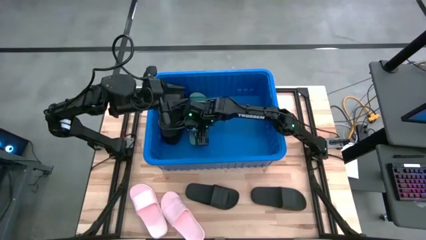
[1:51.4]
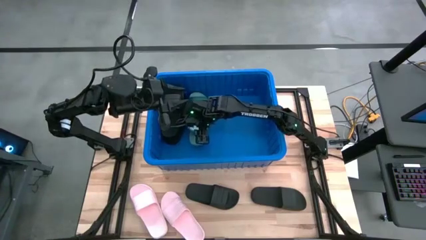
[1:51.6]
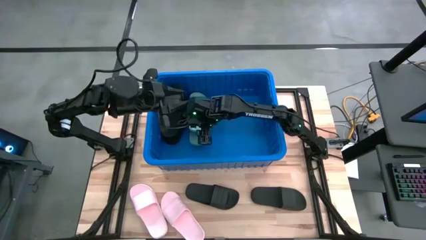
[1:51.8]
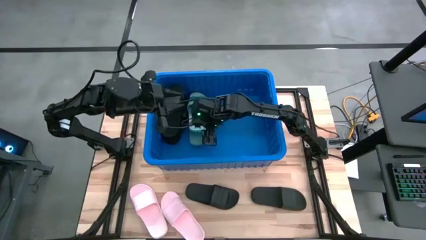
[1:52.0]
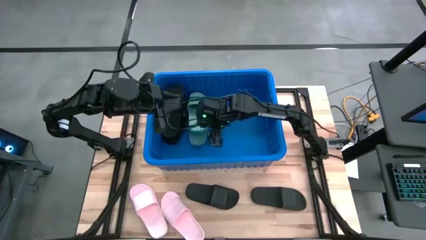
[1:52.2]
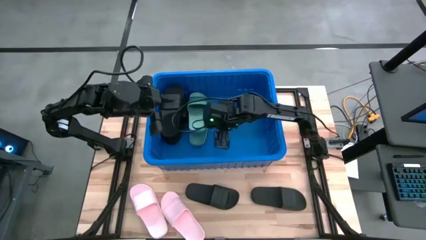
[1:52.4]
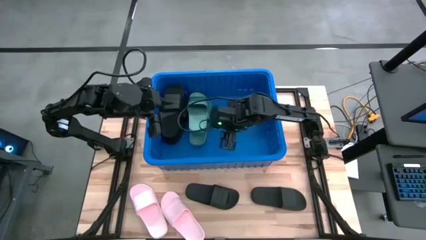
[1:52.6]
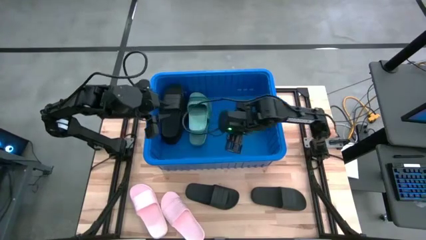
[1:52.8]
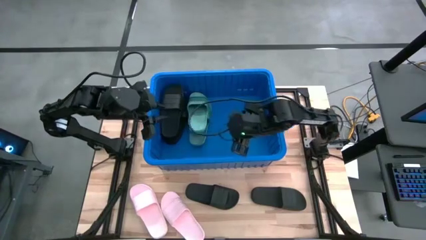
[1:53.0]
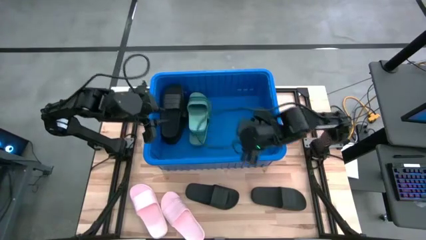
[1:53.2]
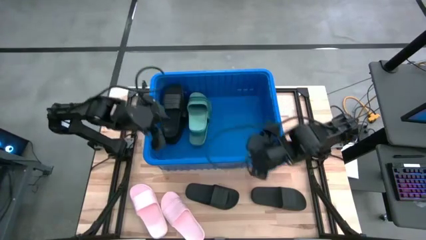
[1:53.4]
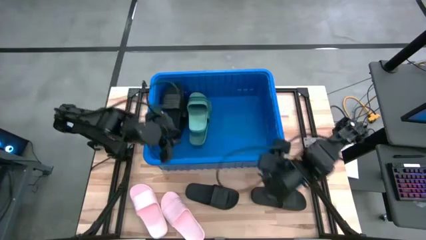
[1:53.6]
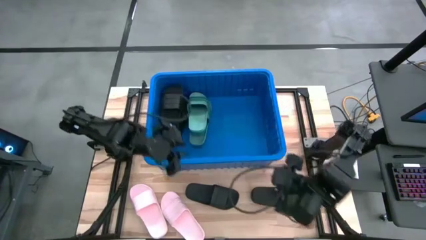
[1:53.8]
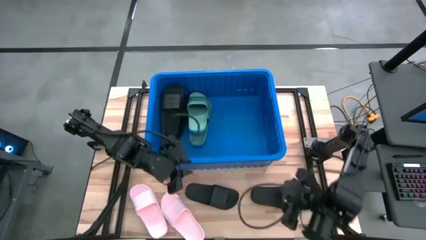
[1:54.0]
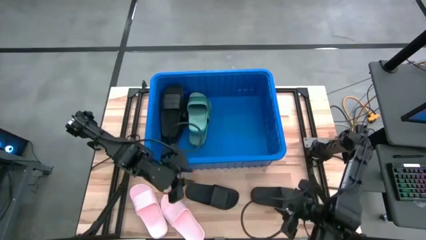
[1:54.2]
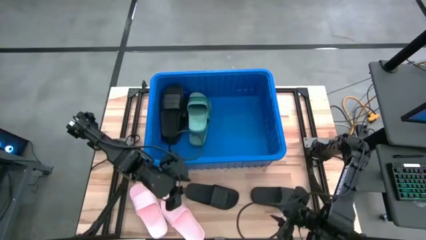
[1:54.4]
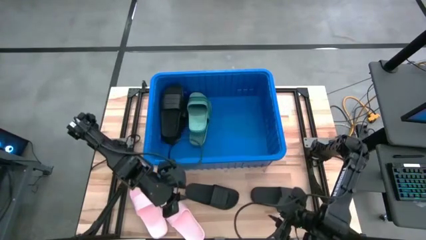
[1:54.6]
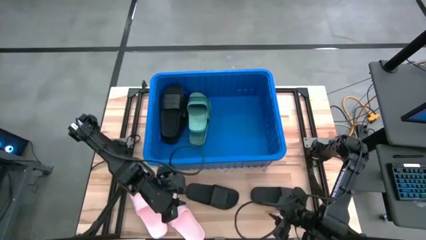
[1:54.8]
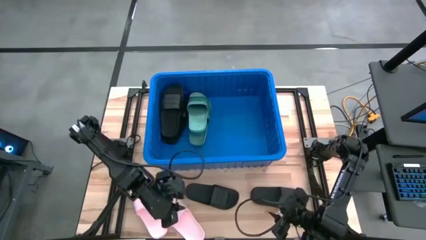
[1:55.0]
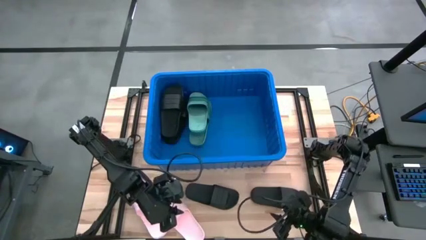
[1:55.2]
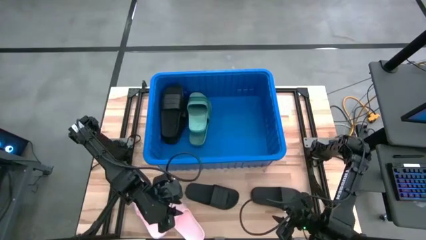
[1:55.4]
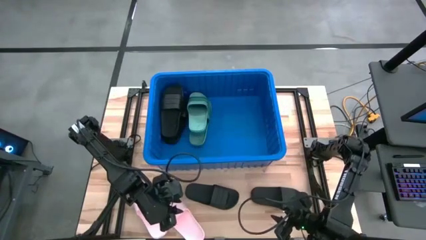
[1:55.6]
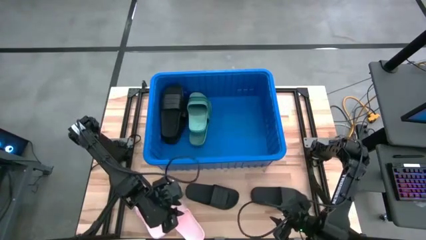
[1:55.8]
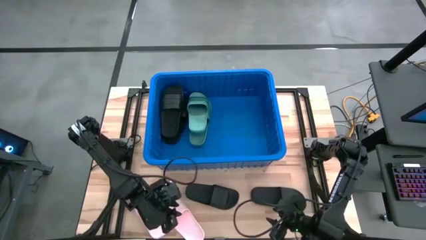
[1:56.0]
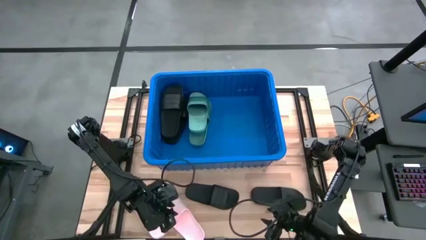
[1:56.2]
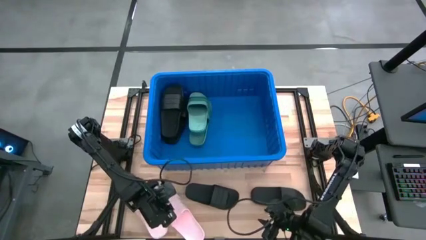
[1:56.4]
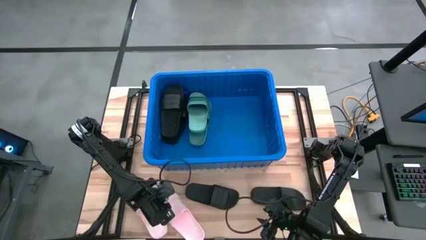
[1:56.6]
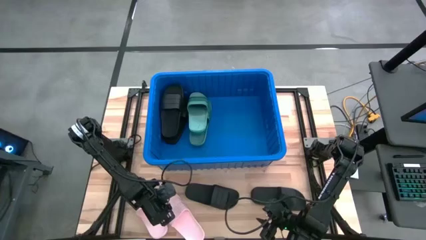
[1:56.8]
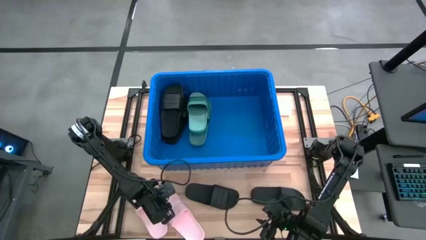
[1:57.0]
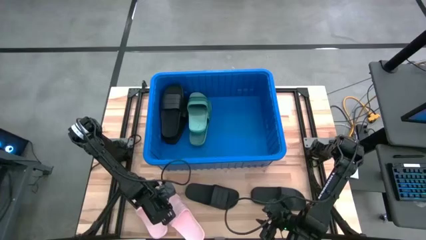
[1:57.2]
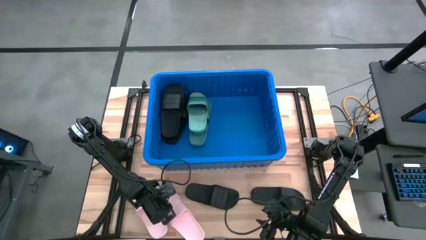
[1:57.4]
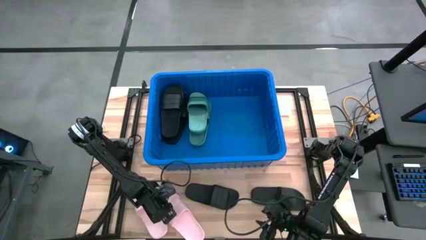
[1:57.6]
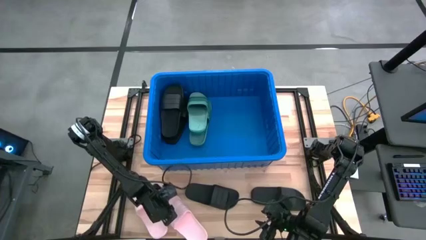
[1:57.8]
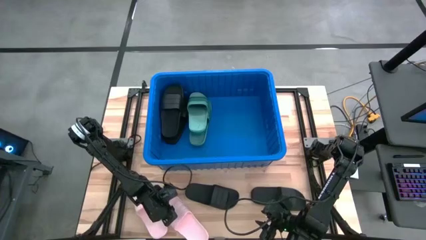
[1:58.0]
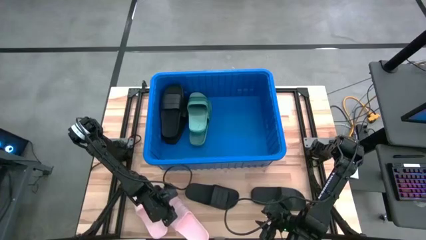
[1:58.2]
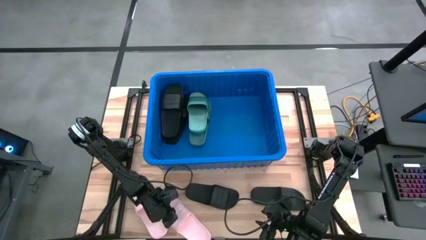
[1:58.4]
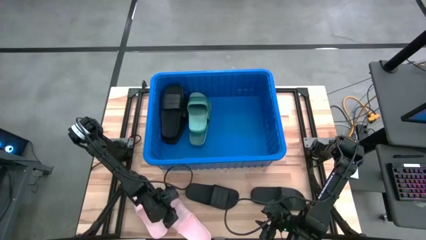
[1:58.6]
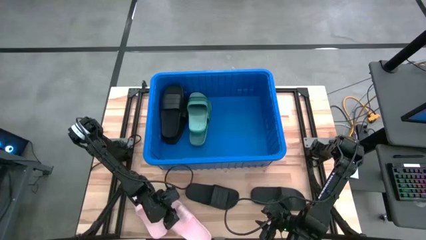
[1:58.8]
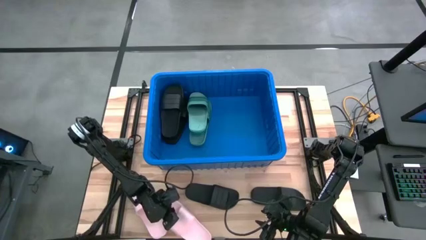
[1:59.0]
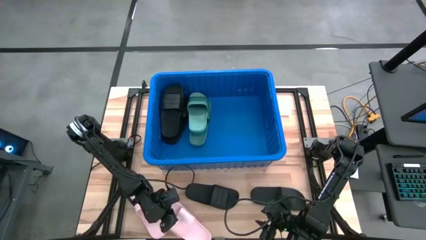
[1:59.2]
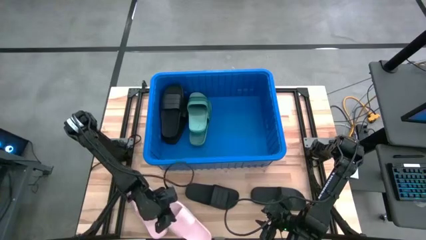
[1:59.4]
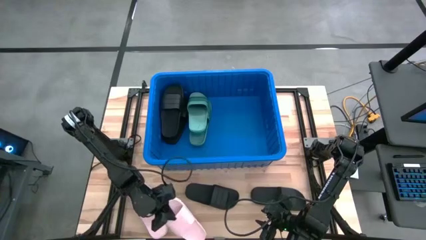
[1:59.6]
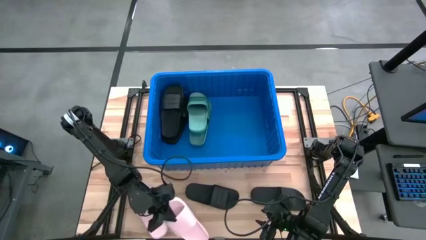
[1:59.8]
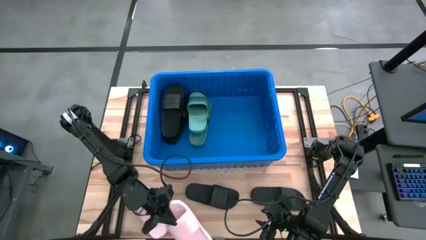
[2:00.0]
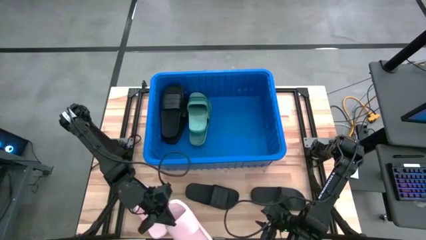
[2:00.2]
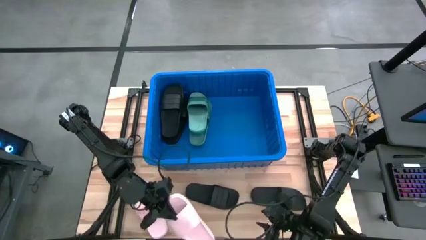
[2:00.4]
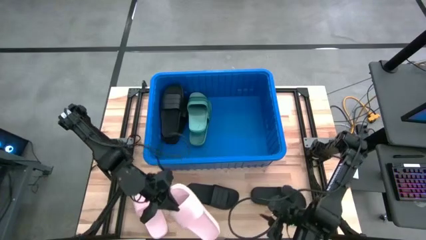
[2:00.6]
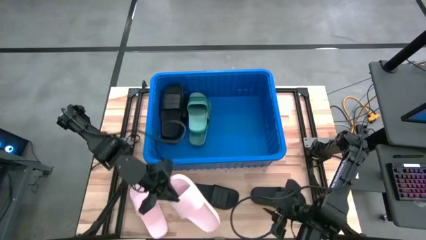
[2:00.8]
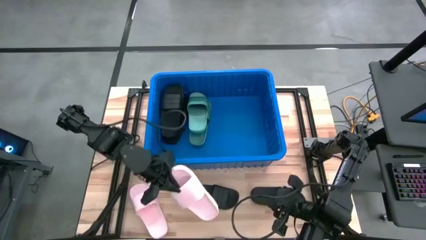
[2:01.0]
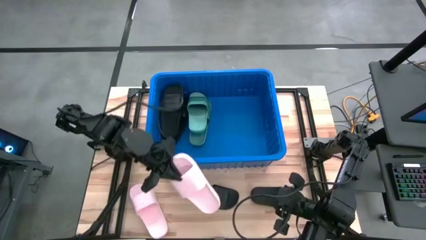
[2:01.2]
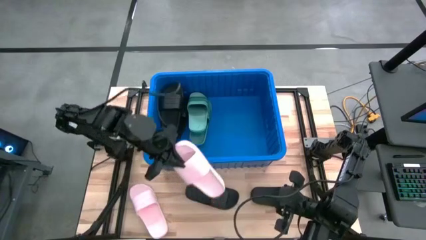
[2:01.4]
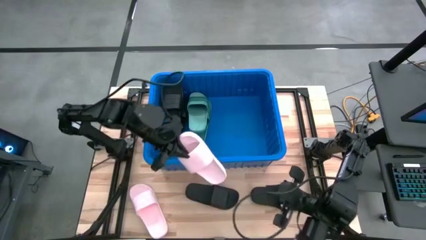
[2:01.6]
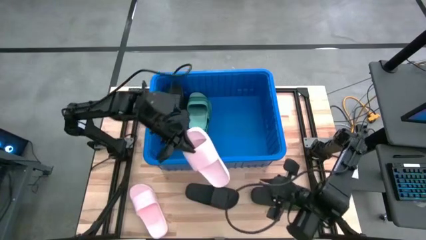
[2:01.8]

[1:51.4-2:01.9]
Task: Pick and place slides into bin
Put the pink slipper into the blue bin

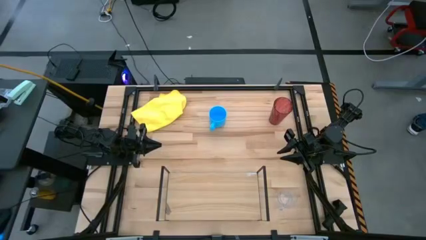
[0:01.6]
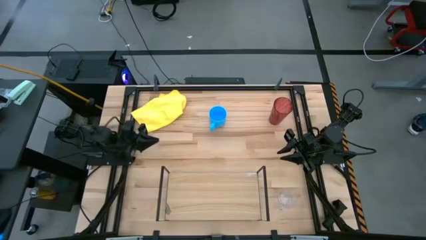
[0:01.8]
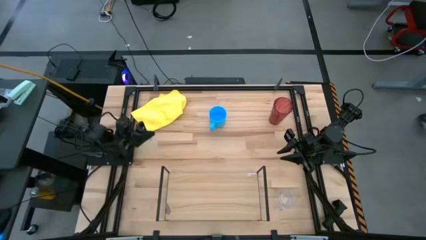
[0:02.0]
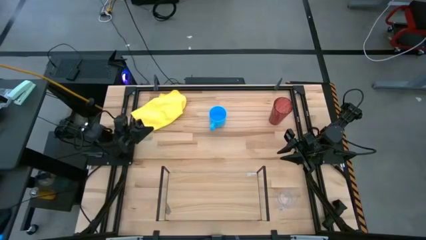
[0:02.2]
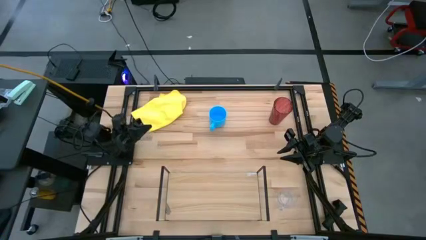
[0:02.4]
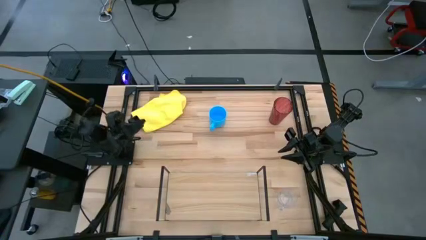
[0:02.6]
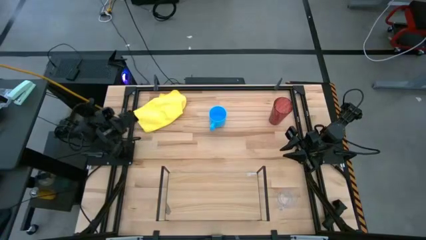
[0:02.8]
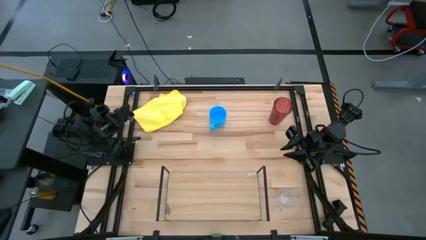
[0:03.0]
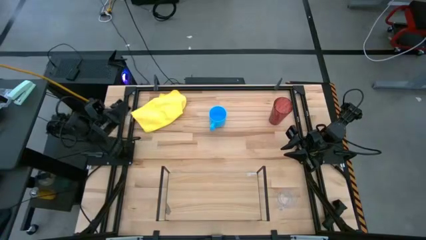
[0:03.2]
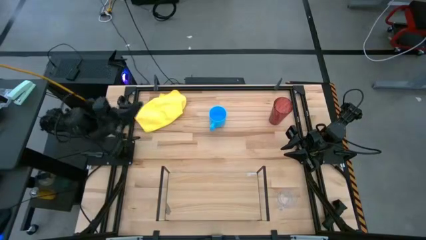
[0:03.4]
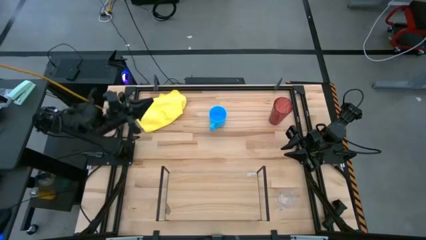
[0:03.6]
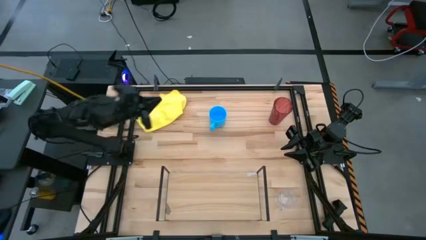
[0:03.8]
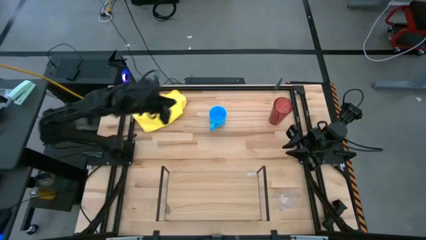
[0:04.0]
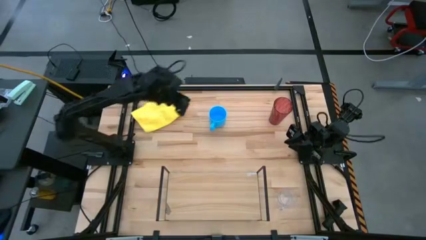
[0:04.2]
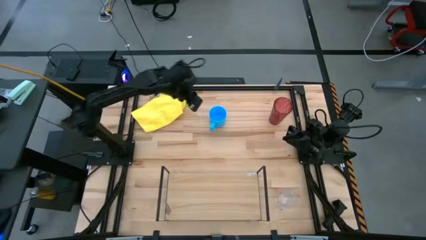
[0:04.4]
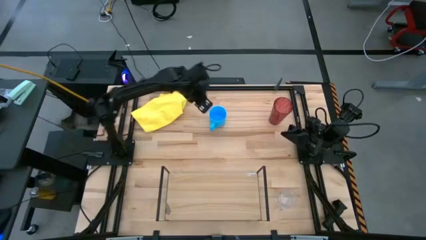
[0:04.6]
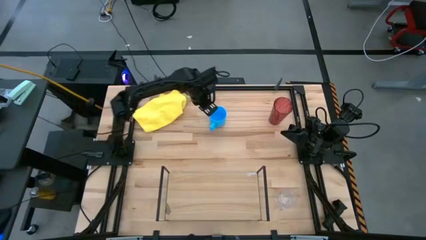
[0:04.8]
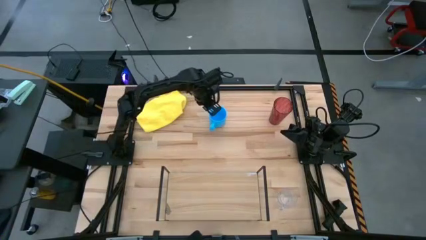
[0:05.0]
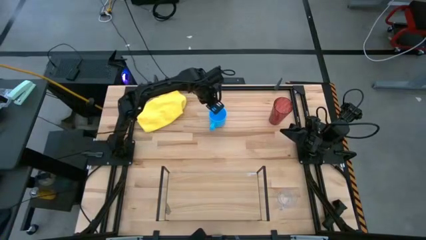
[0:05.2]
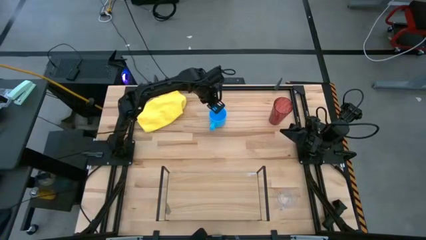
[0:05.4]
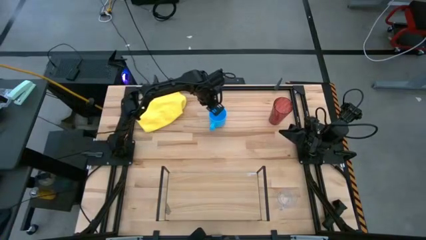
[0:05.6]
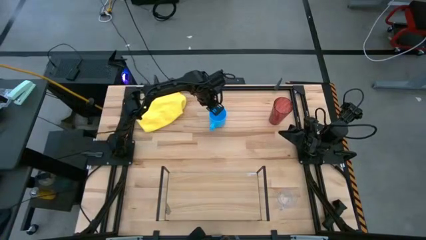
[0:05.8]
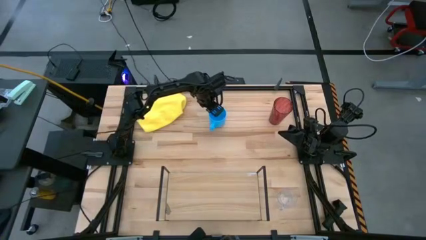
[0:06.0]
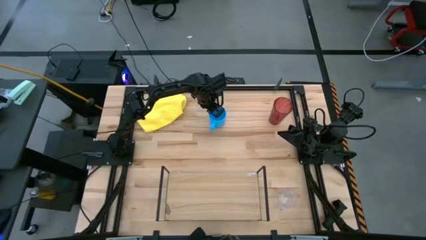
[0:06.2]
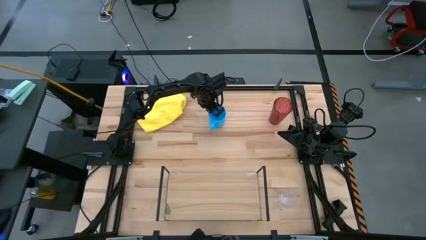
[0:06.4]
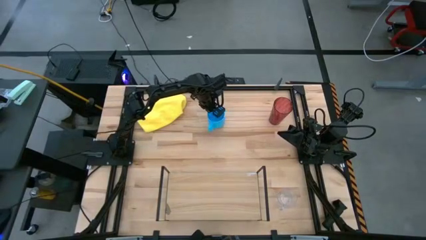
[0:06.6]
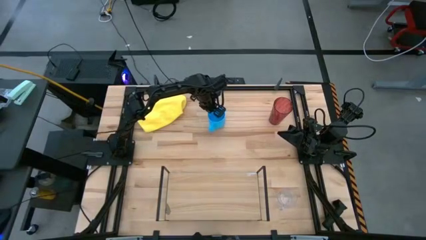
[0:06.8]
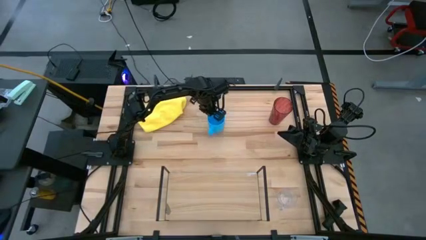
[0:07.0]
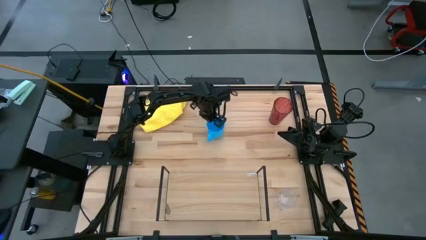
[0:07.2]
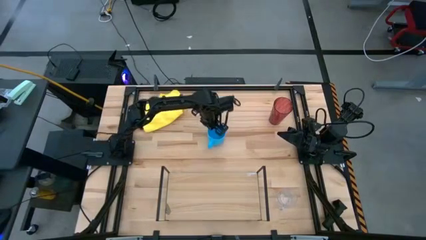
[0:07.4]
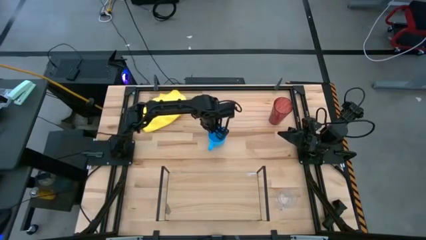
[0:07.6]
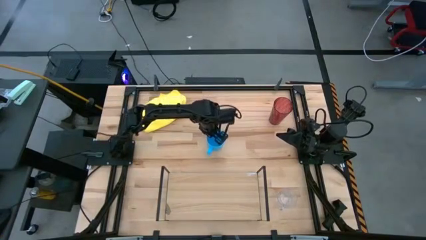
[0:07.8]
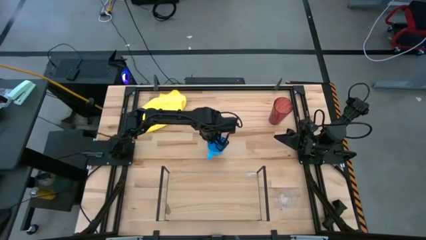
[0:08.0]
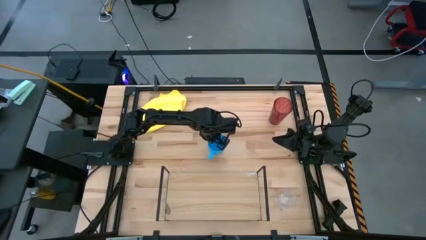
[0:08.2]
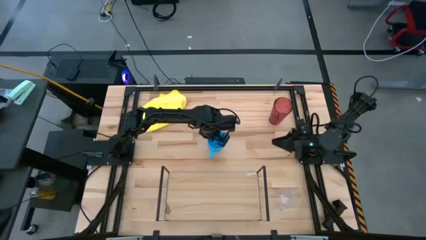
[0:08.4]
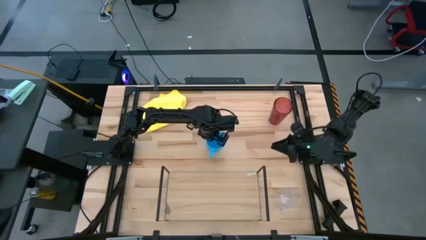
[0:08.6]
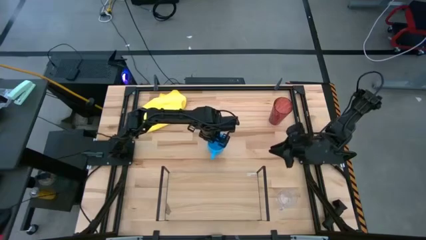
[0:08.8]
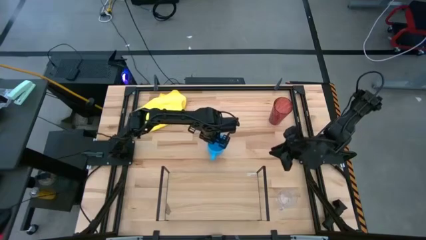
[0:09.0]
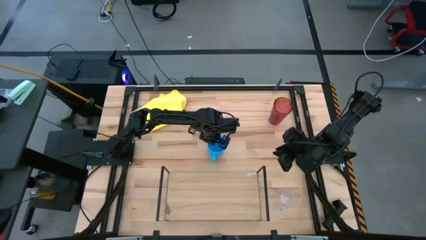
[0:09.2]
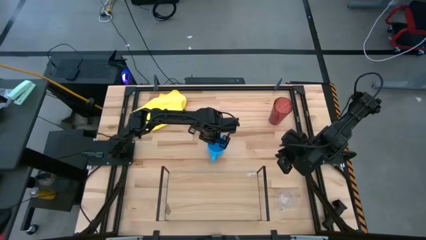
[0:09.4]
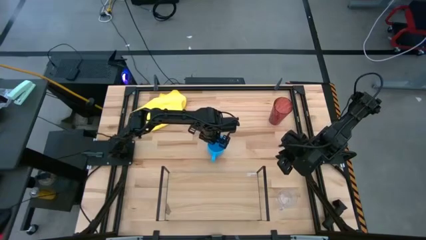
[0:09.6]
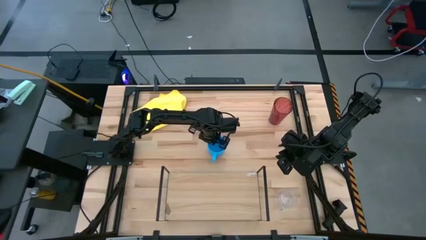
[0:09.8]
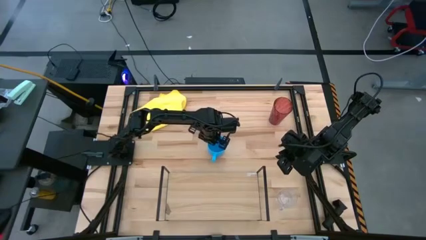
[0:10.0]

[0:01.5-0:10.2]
Task: Stack small to large cups/mugs on shelf
Move the blue mug to the middle of the table
